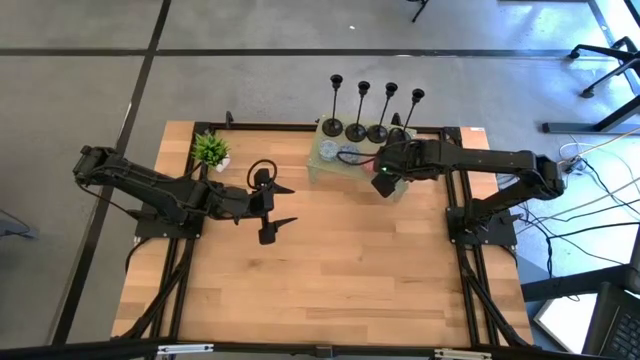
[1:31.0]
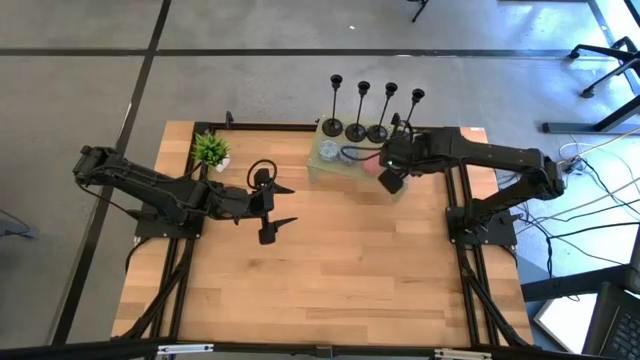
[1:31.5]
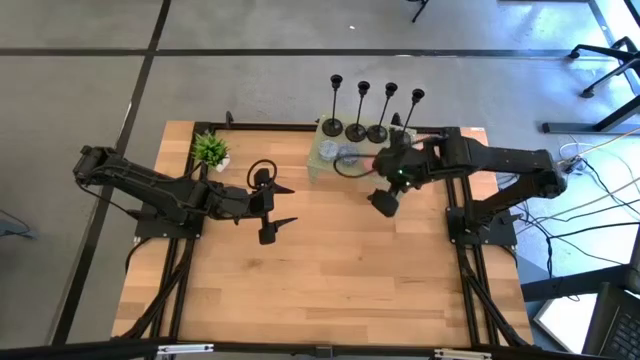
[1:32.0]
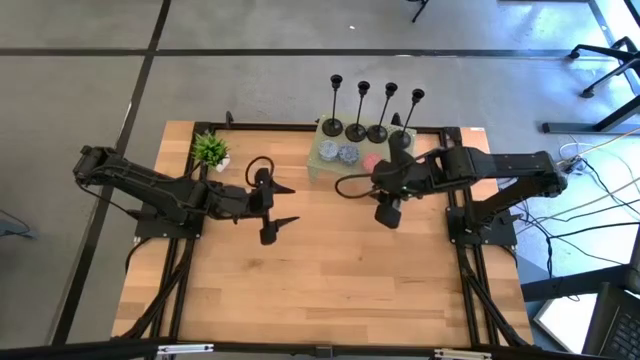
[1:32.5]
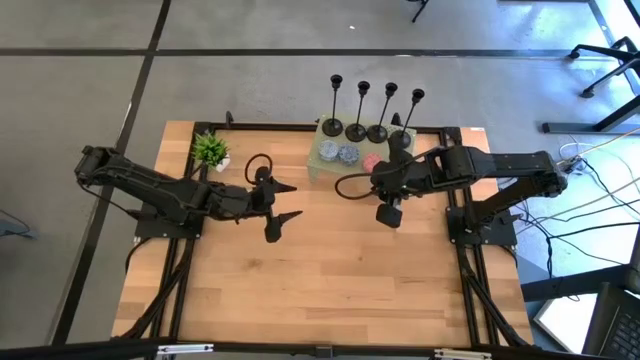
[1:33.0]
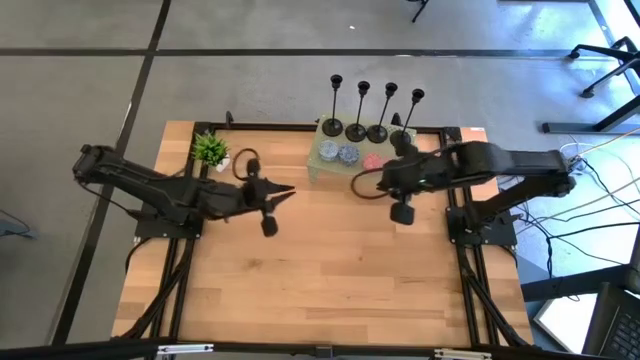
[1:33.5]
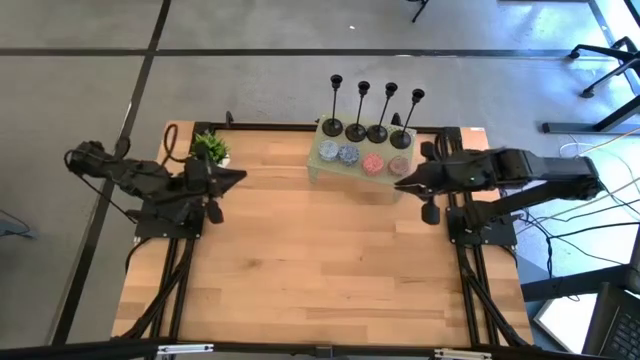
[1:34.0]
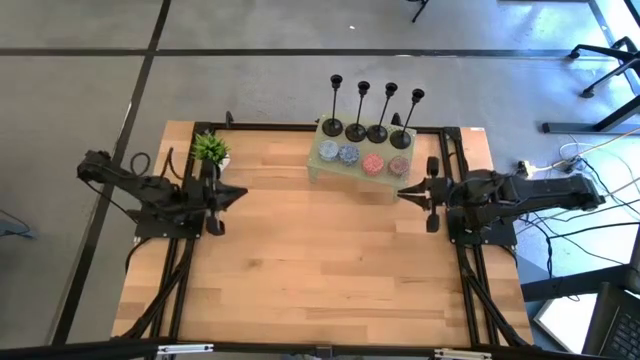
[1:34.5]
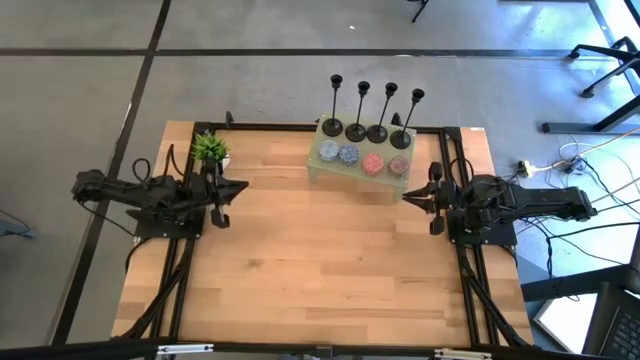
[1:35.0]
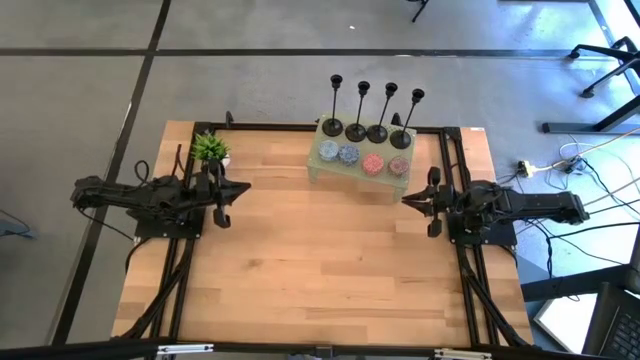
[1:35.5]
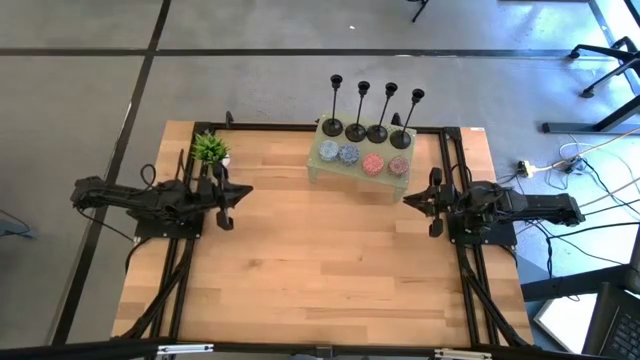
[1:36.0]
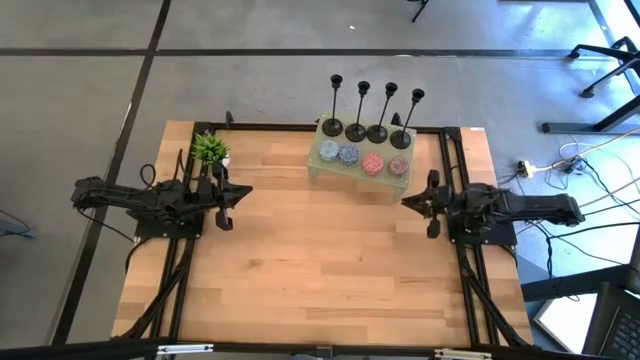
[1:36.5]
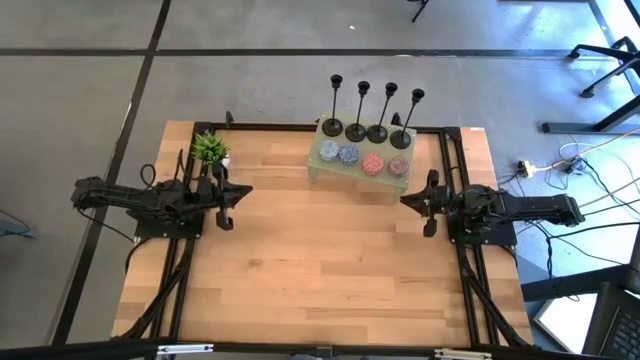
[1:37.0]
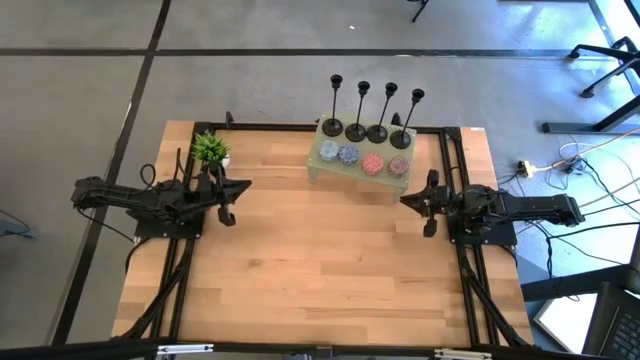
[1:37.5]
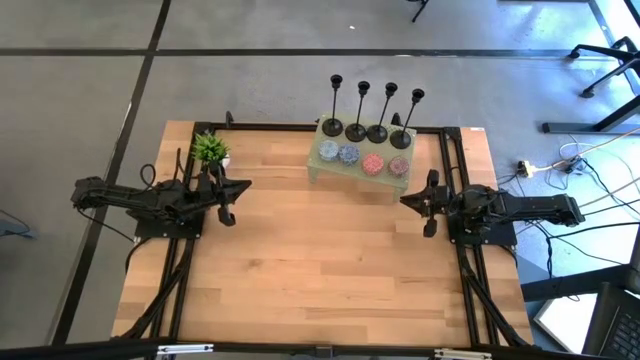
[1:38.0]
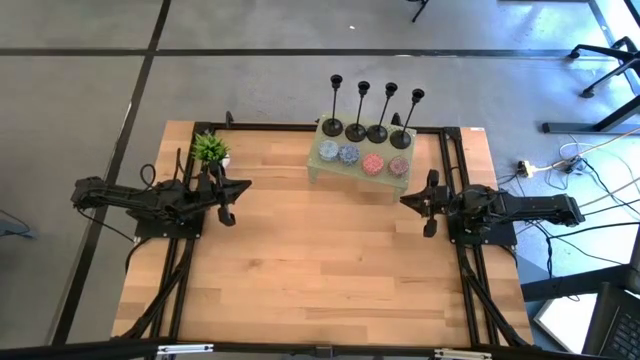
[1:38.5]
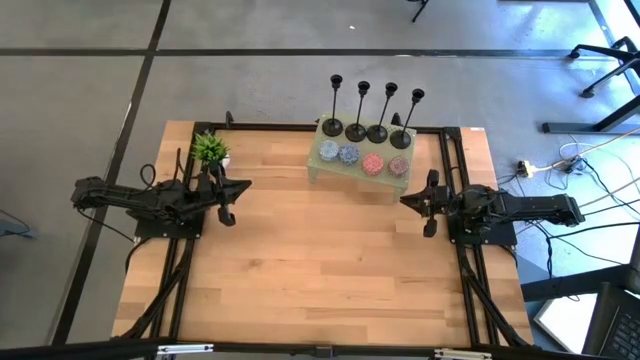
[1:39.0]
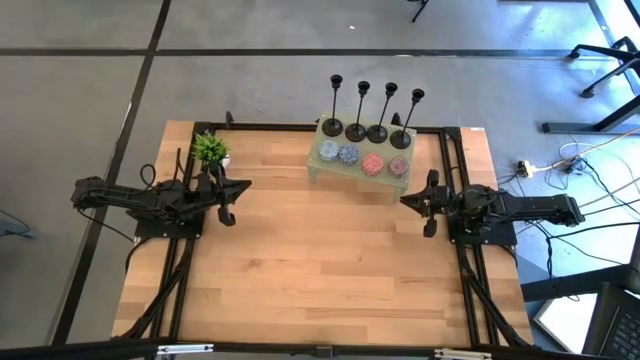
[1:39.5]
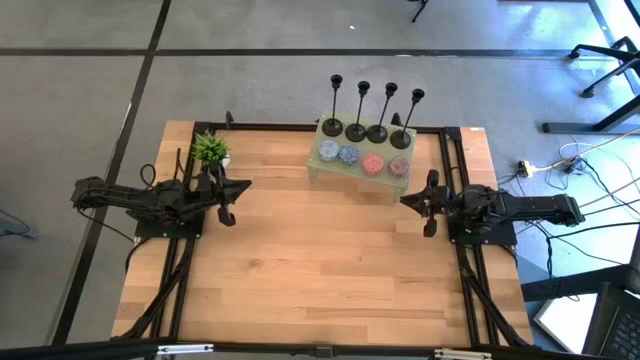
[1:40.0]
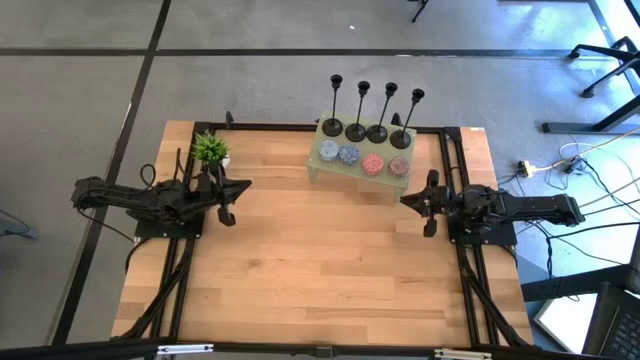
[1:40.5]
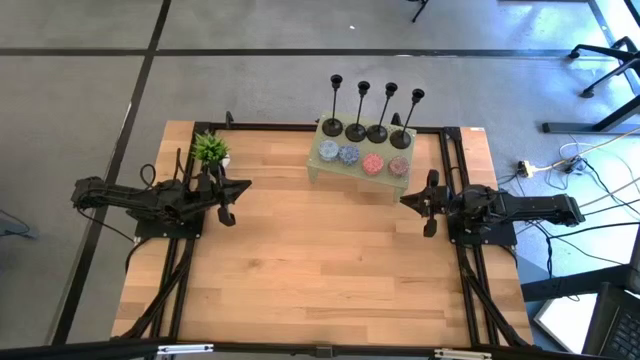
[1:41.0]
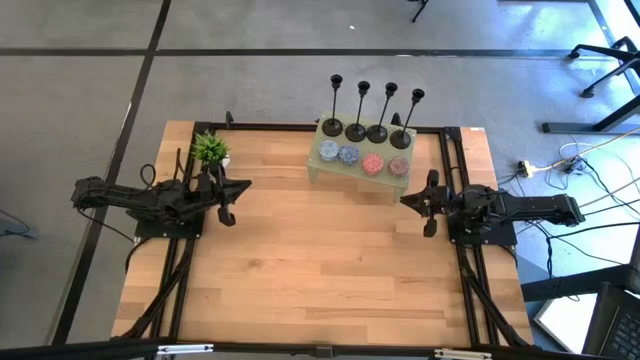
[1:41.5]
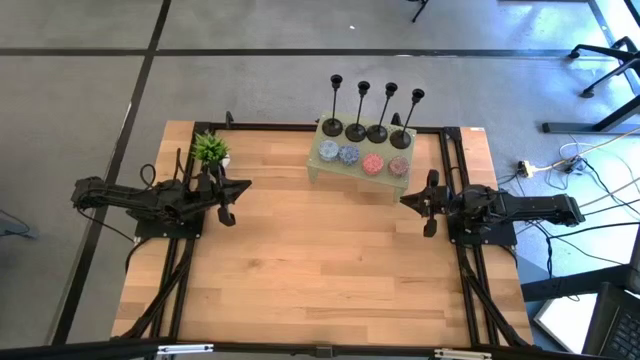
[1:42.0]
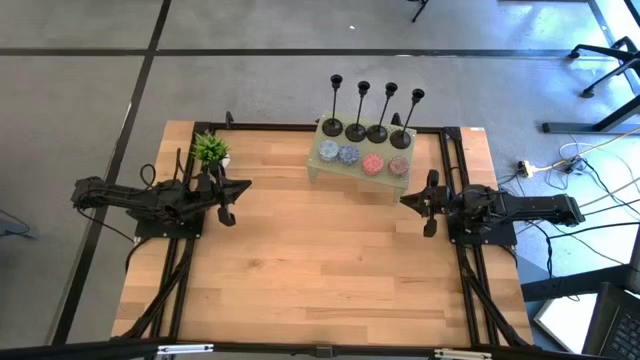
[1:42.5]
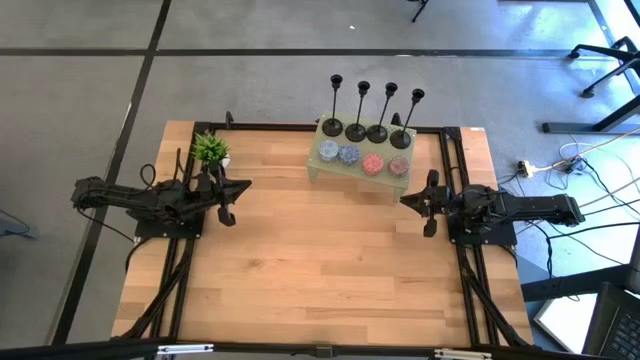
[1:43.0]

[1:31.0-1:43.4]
Task: Pick & Place candle stick holders
Return to Home Position

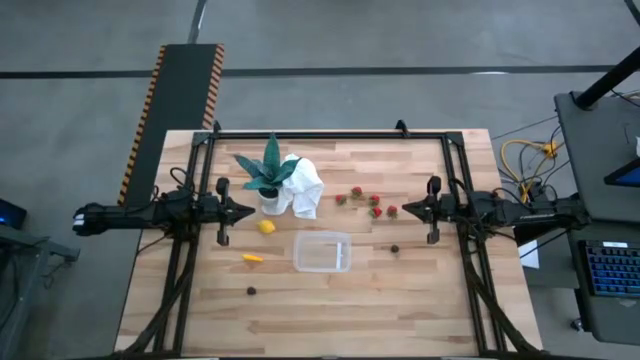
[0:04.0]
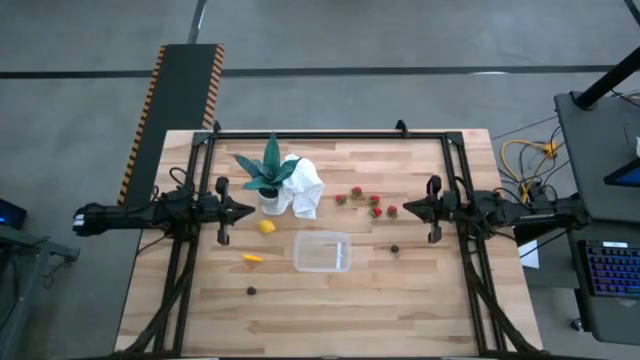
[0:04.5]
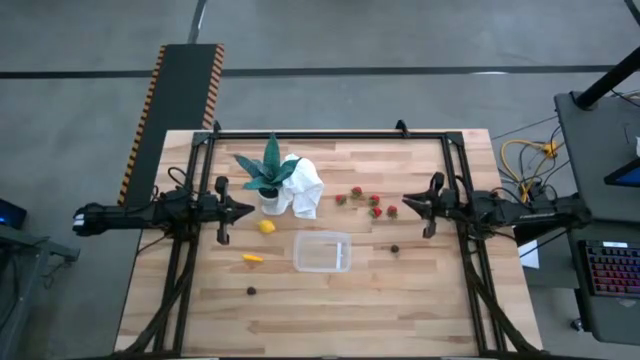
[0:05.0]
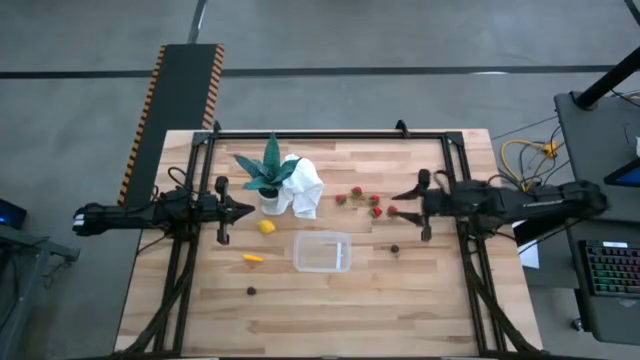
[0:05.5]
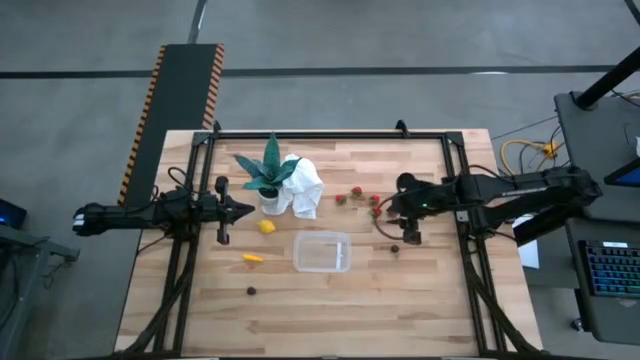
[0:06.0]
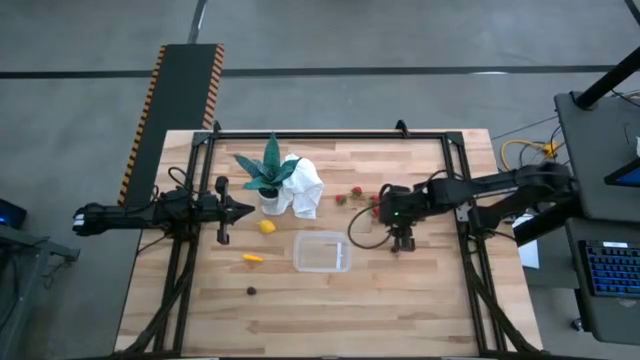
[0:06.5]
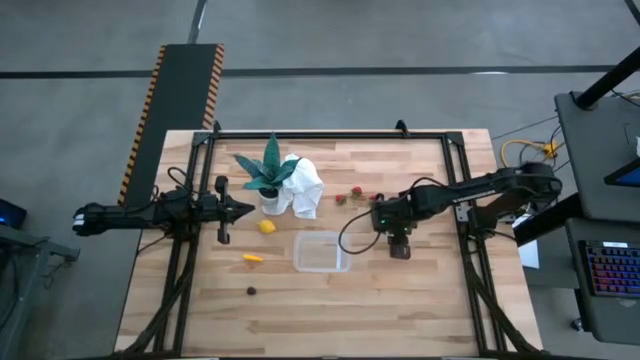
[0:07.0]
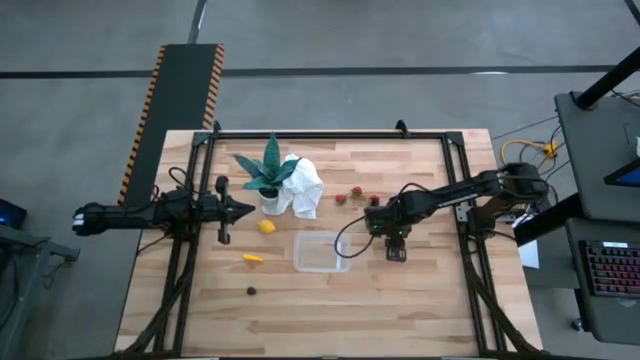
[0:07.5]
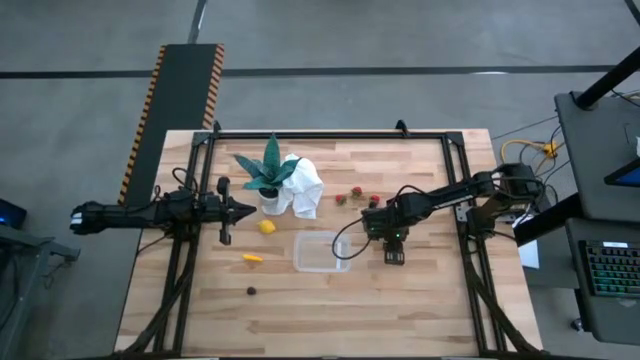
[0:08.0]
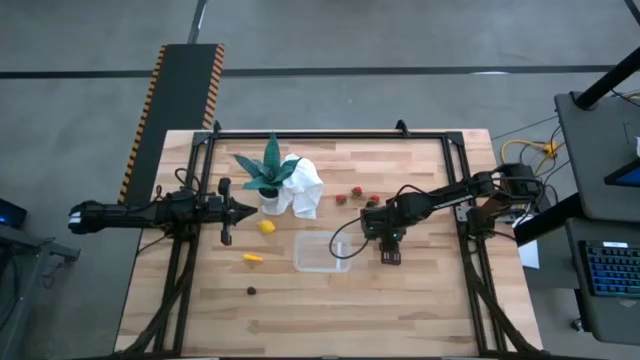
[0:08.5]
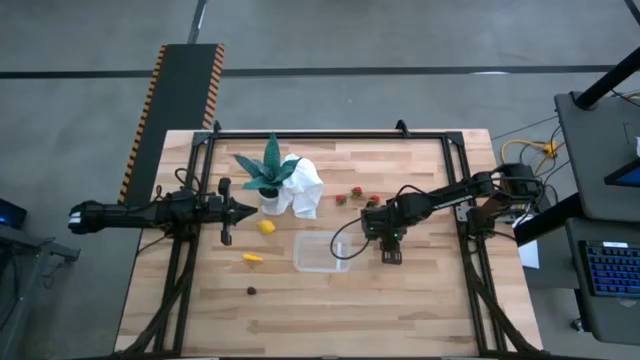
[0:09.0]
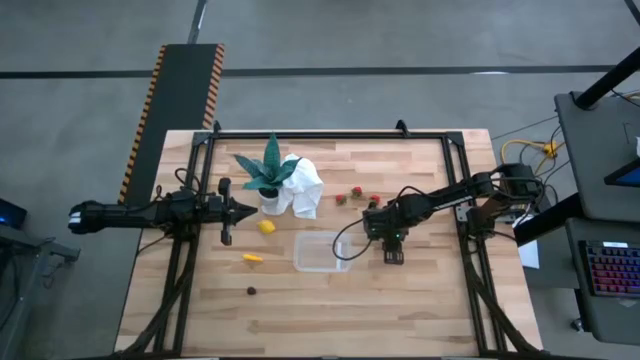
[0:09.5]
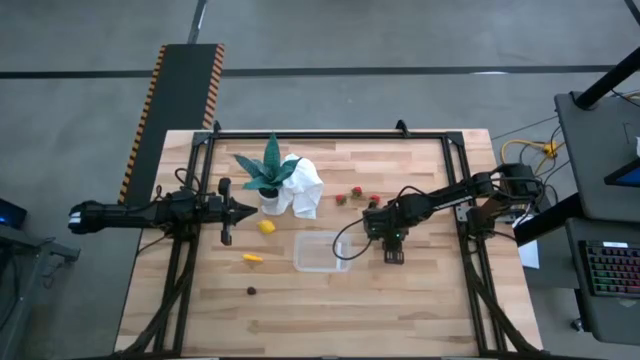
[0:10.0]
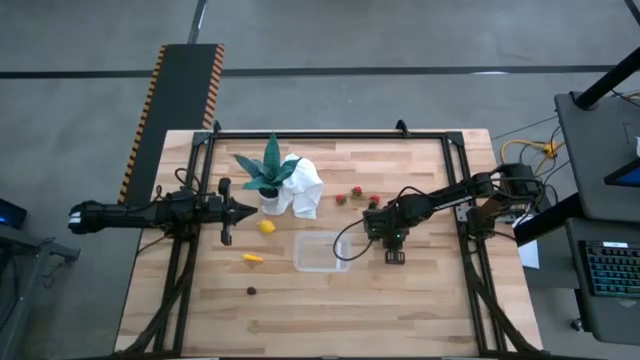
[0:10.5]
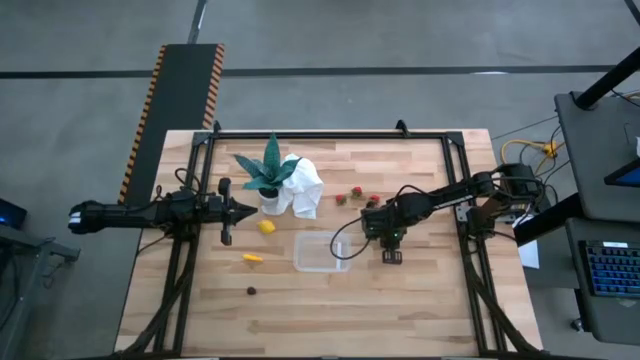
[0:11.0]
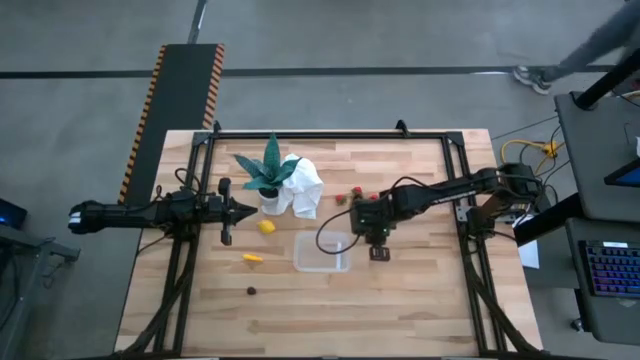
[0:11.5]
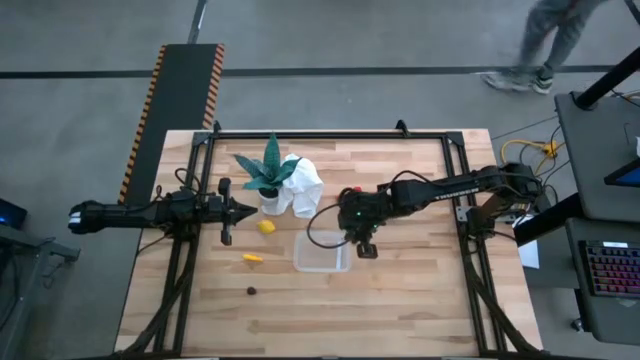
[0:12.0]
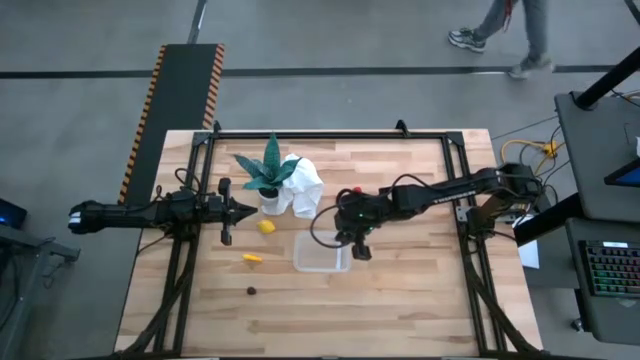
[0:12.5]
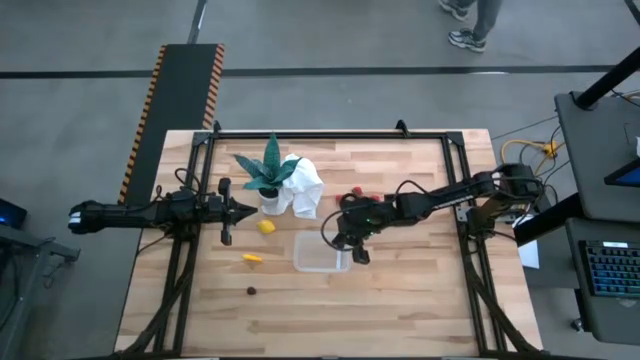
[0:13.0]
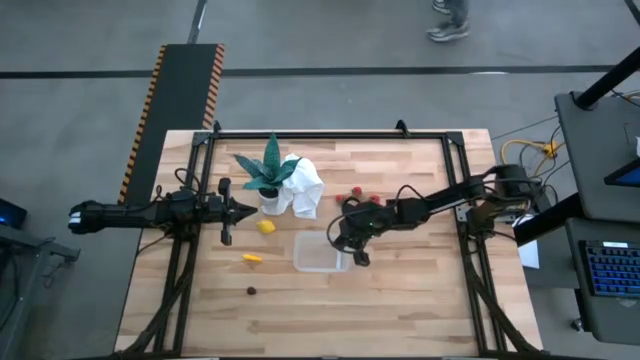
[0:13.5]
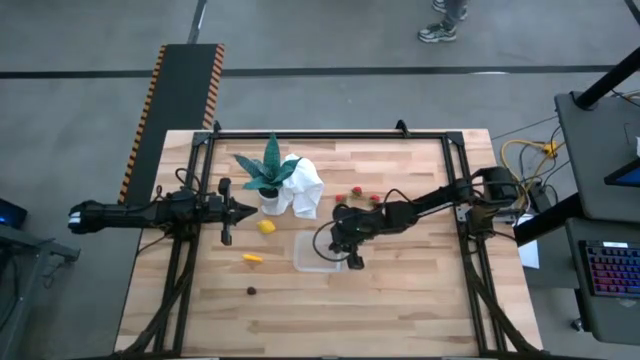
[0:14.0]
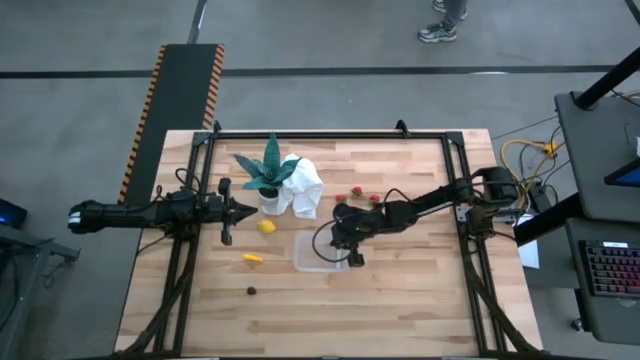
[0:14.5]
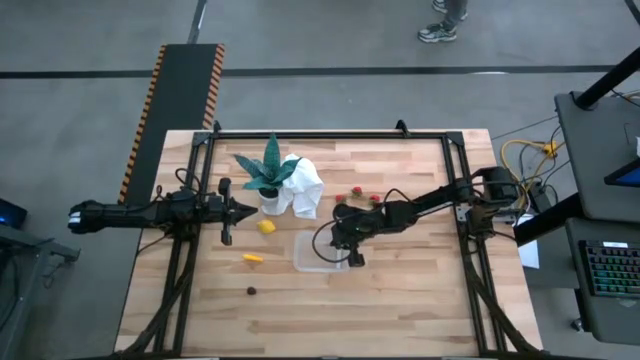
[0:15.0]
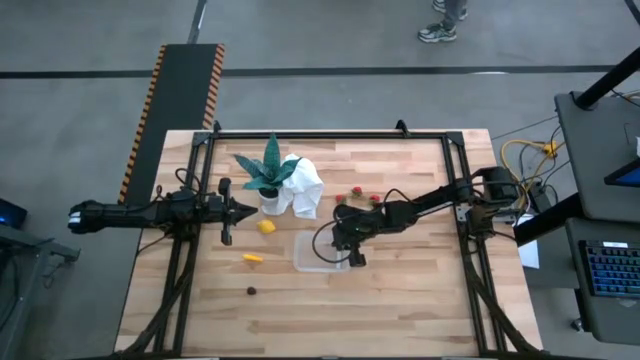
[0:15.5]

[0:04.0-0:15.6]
Task: Pick and placing Produce into tupperware
Put the cherry into the bin
